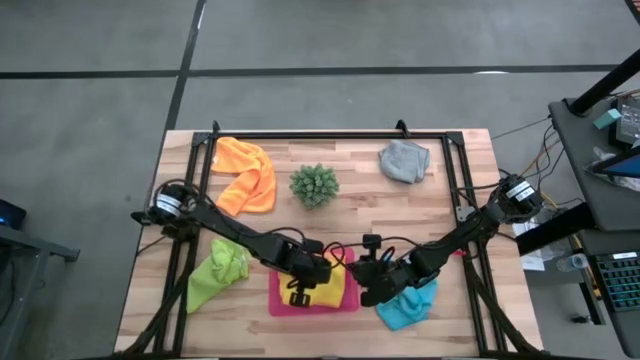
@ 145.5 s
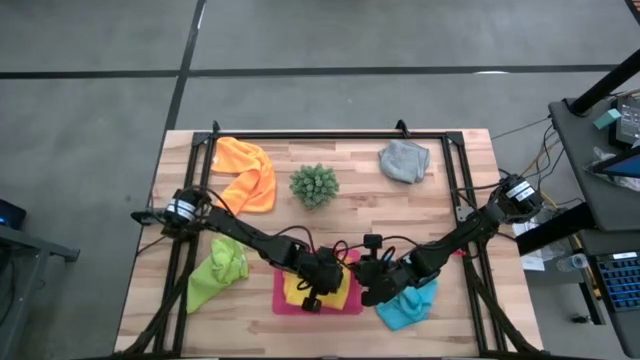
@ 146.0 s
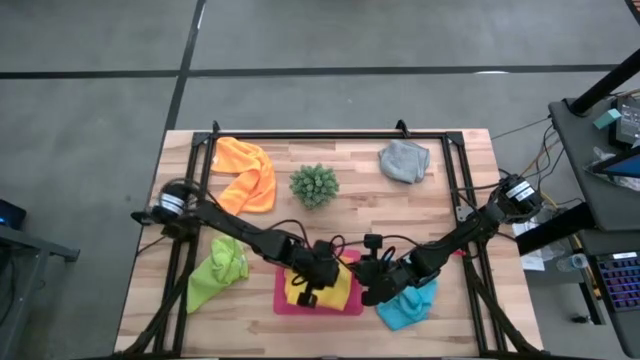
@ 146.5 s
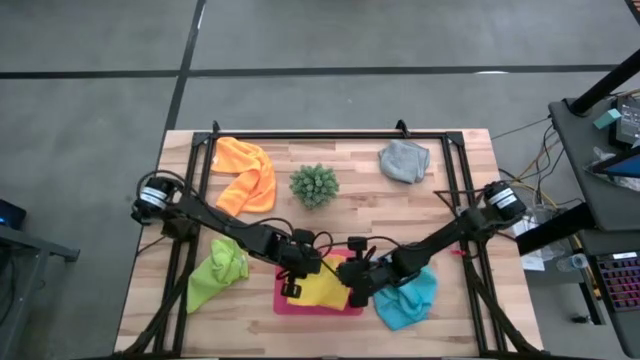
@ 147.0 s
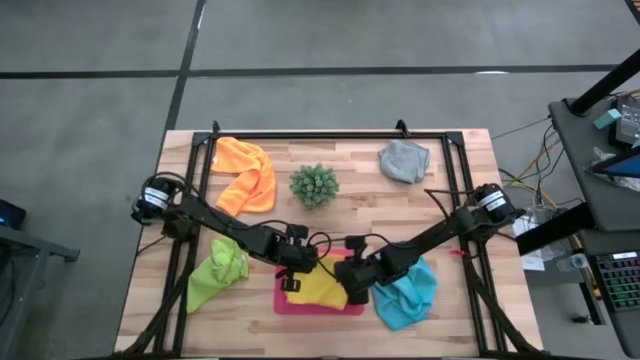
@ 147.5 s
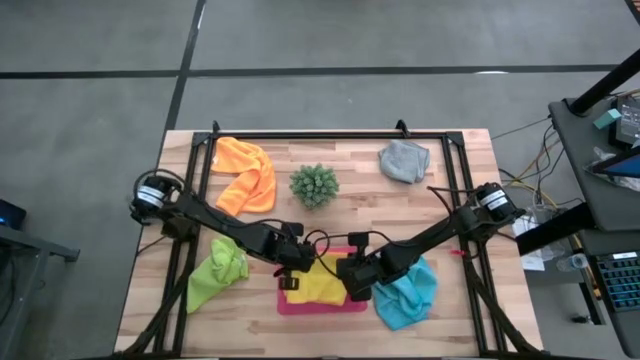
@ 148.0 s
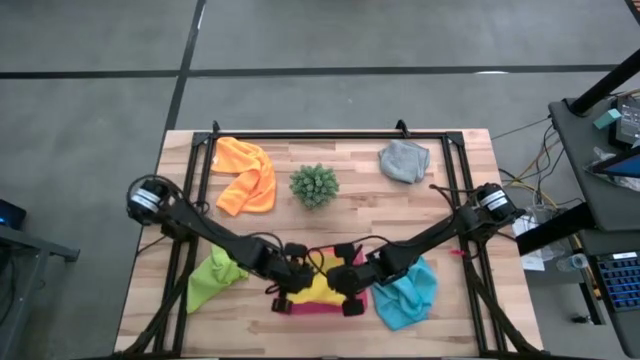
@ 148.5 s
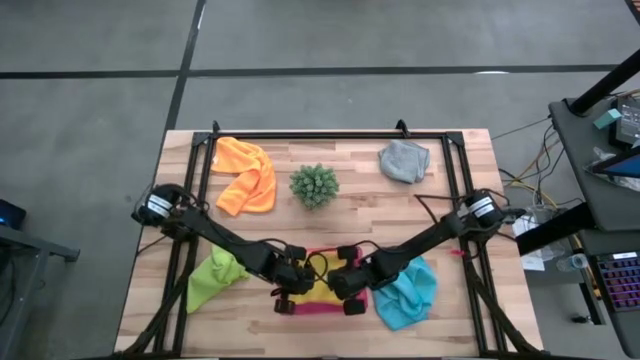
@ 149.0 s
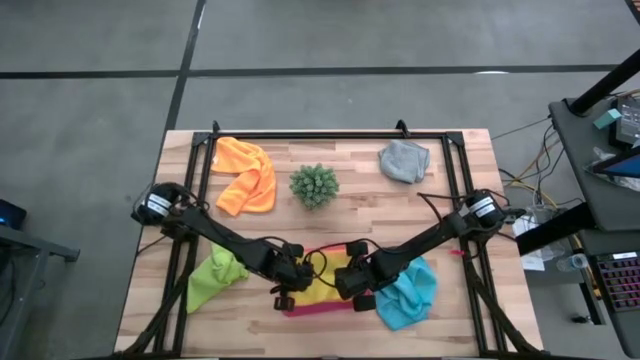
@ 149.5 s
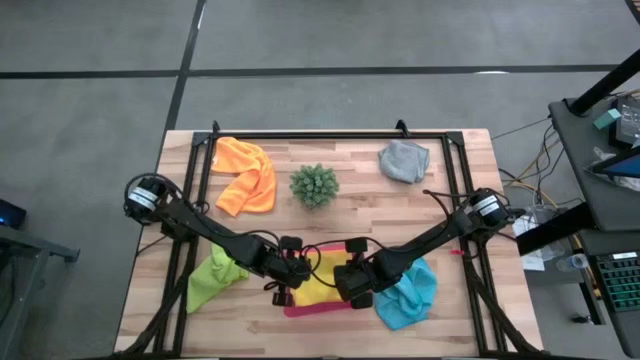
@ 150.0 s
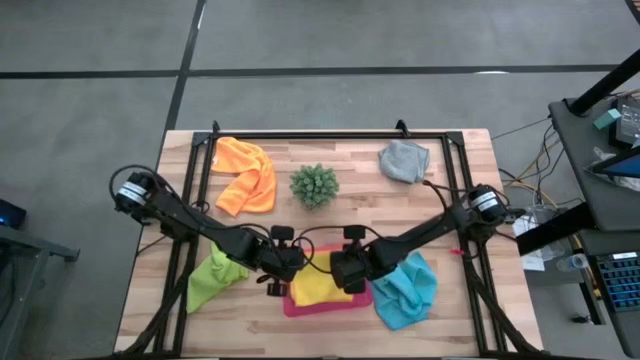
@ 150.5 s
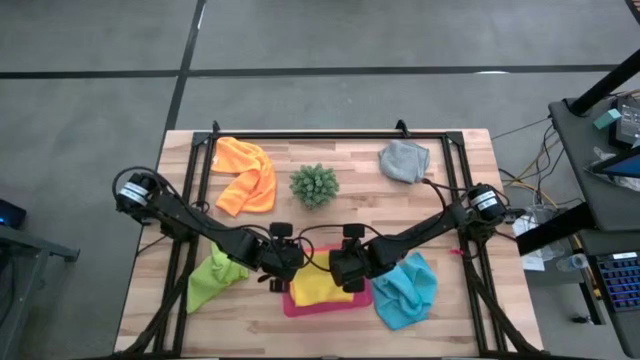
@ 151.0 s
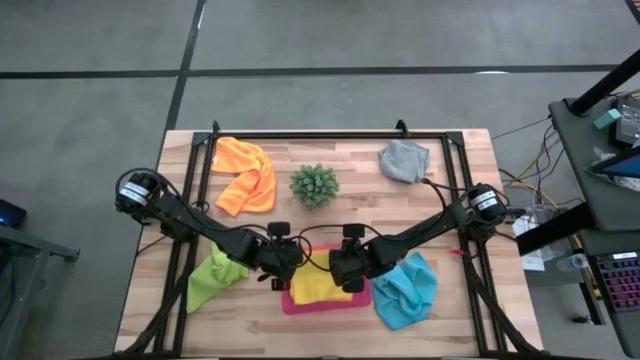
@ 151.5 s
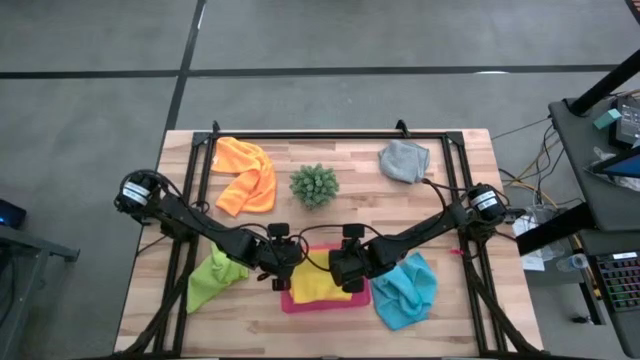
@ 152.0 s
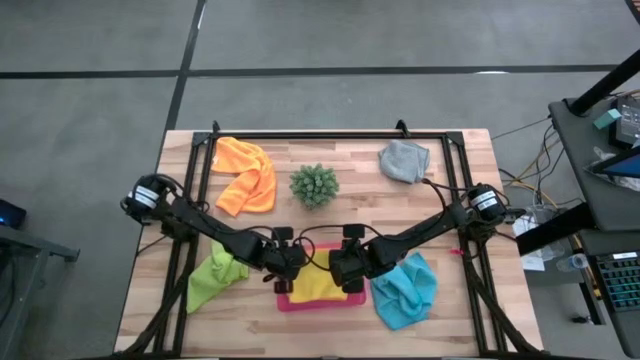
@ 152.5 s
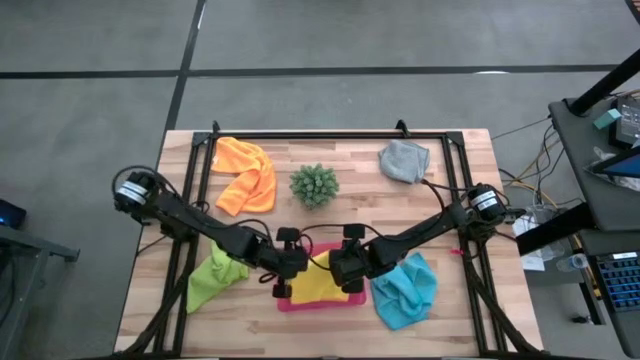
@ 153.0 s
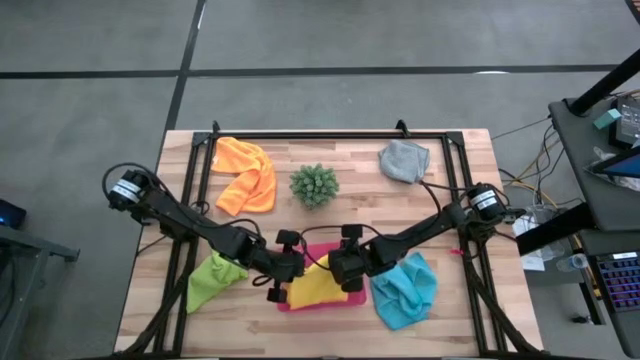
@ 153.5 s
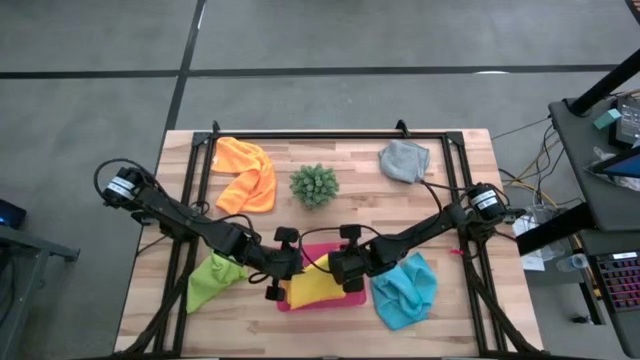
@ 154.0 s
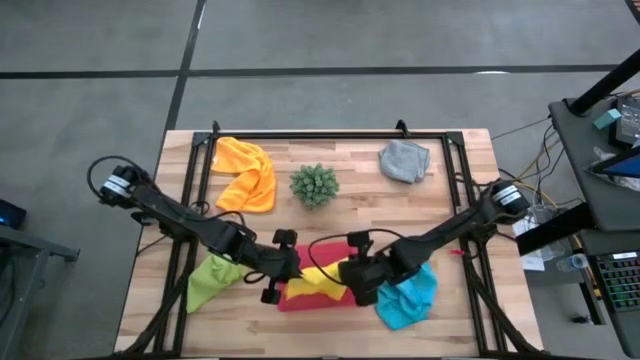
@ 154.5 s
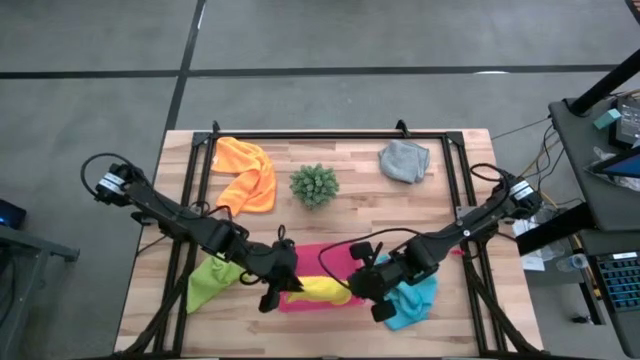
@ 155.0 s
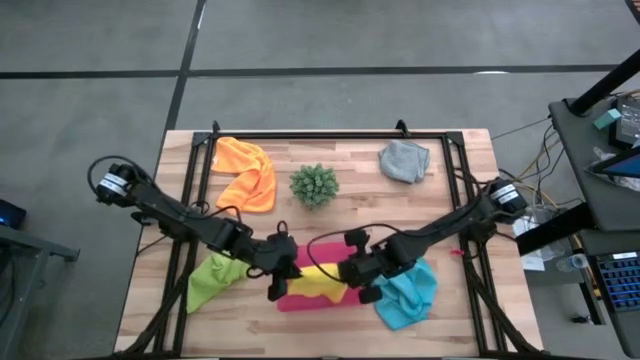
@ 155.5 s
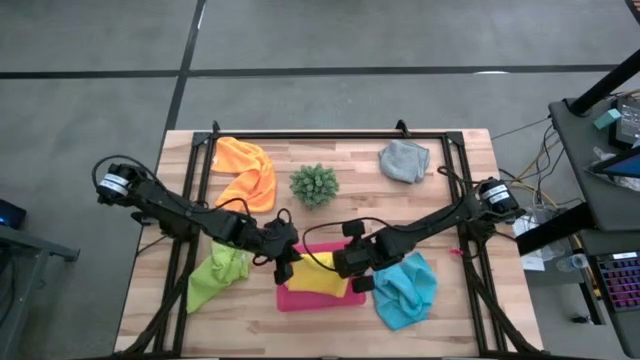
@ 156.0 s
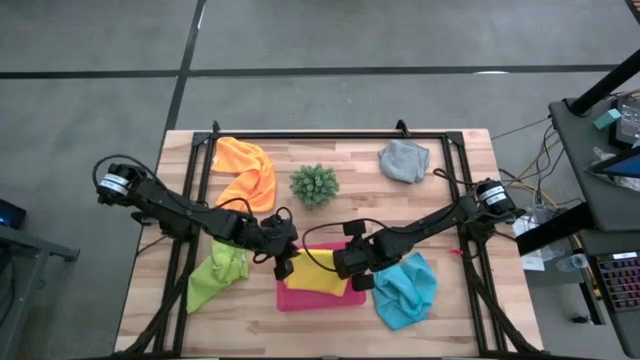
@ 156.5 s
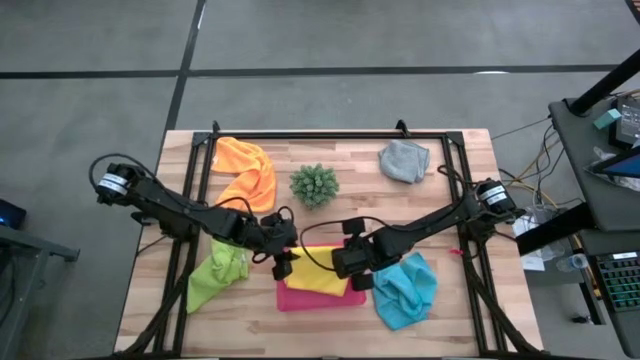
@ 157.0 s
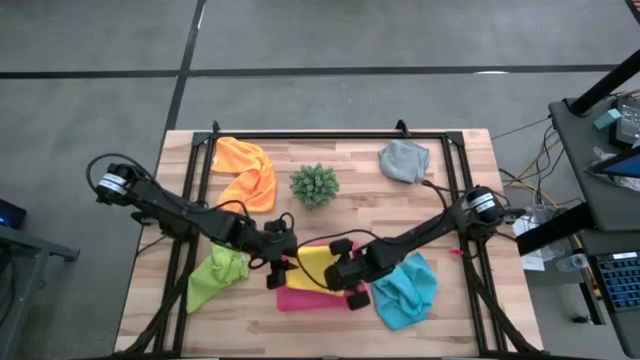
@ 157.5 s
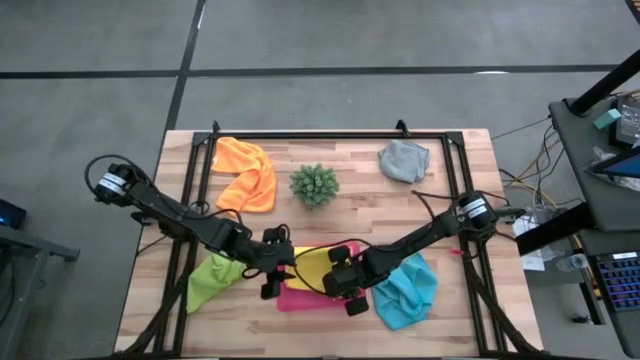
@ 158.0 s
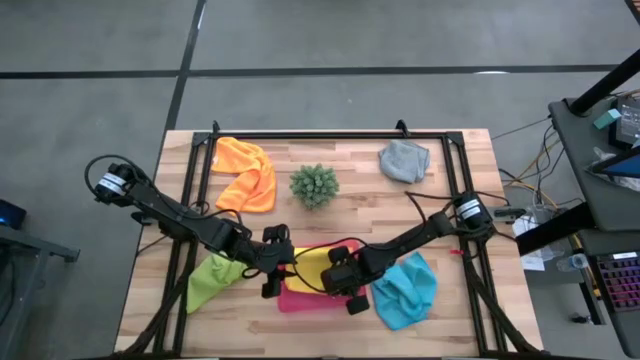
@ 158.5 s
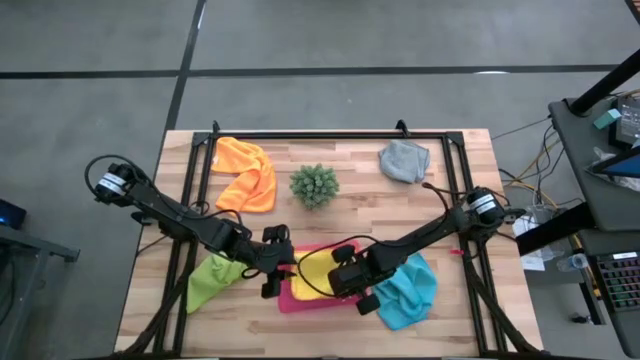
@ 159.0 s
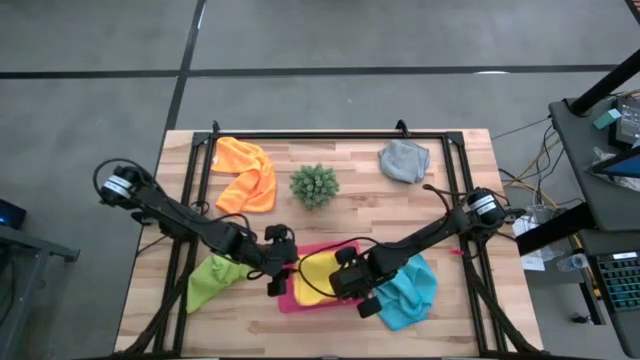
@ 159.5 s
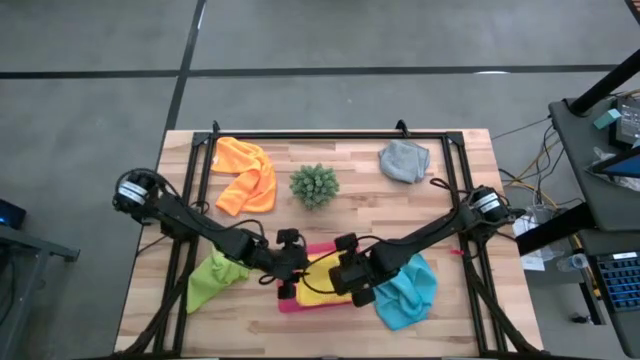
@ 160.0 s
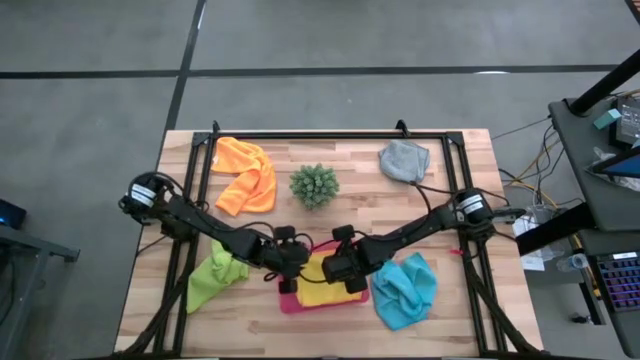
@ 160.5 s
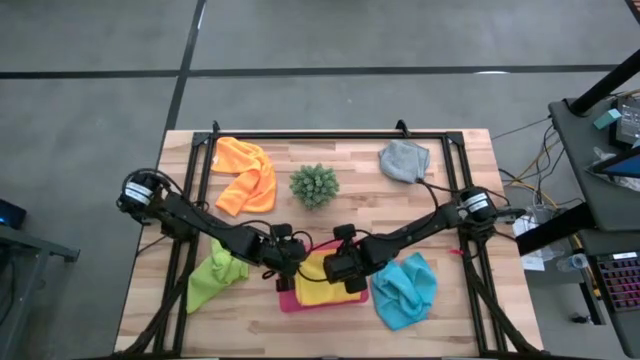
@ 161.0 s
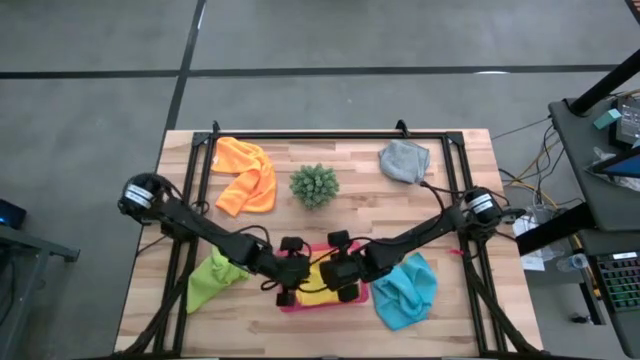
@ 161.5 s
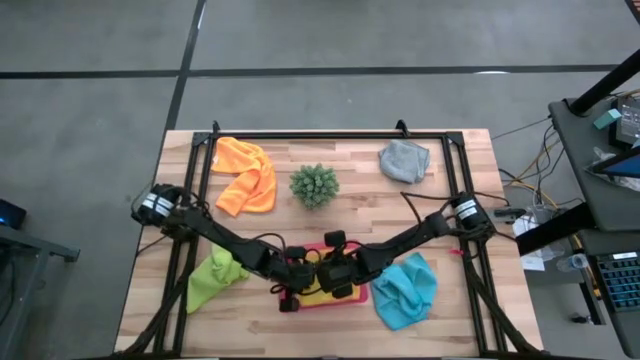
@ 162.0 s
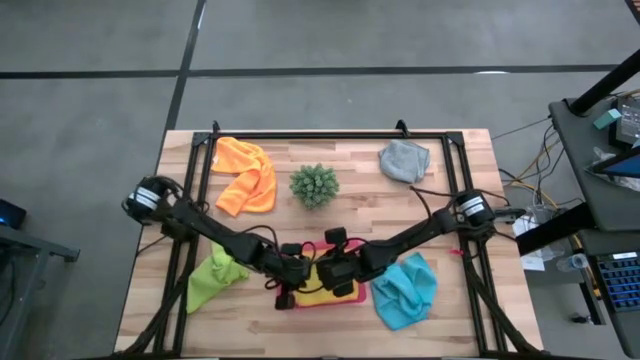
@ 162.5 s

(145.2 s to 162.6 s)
Task: Fold microfiber towels
Put the yellow microfiber cloth into the pink bin

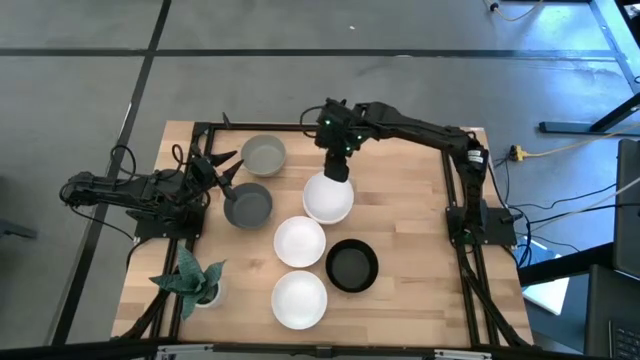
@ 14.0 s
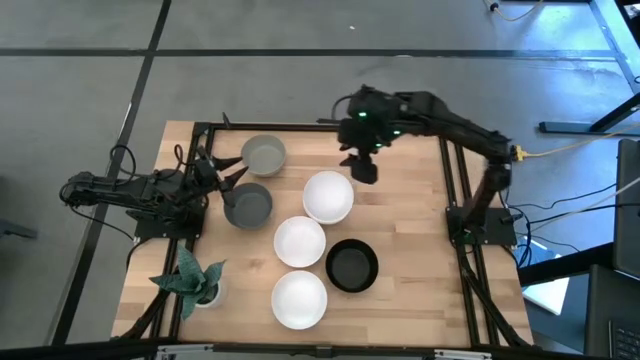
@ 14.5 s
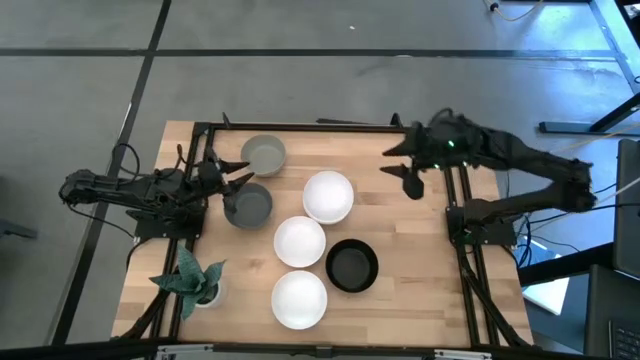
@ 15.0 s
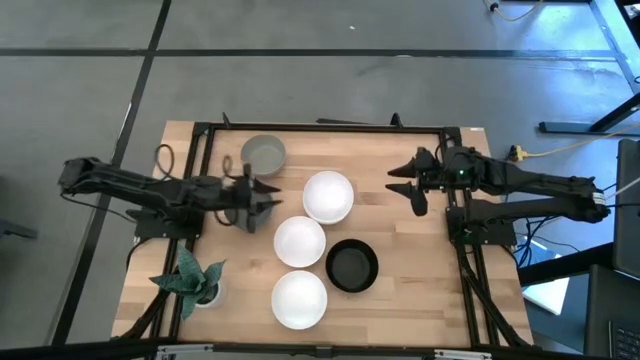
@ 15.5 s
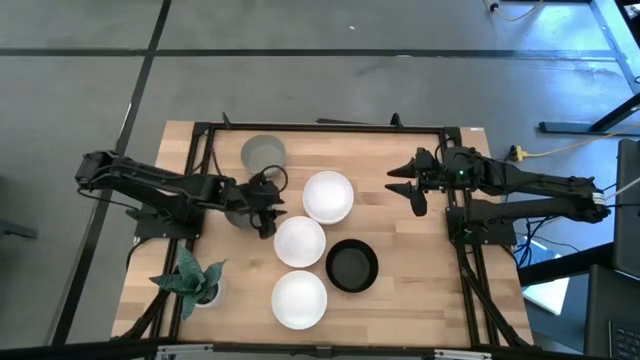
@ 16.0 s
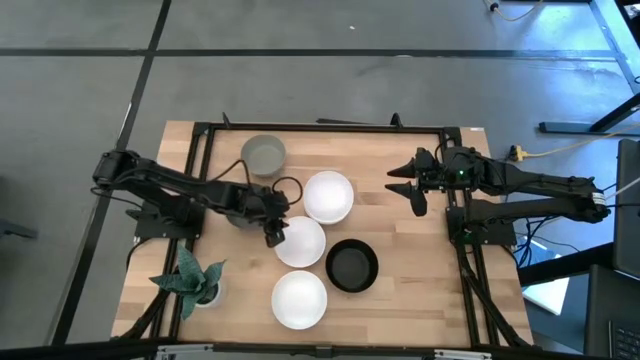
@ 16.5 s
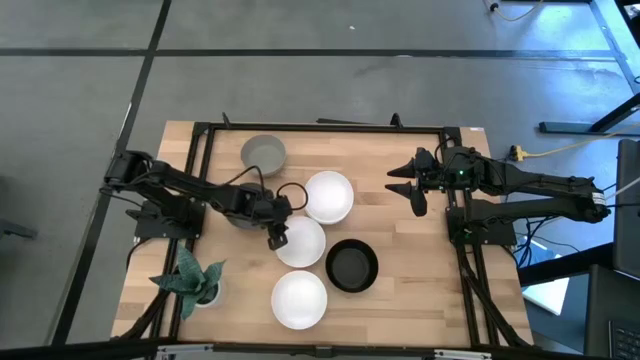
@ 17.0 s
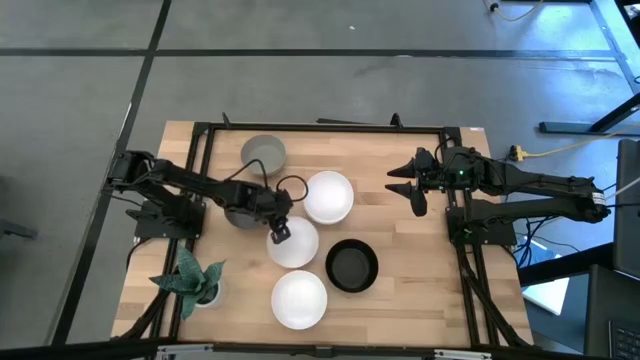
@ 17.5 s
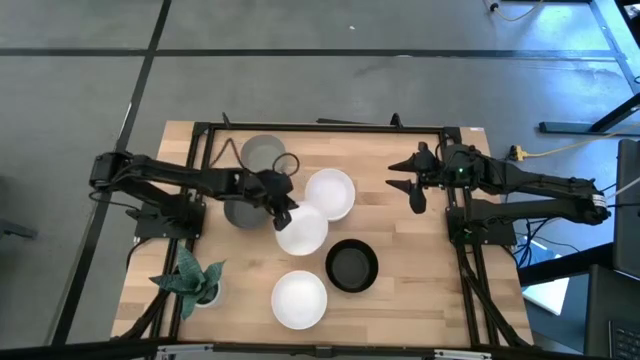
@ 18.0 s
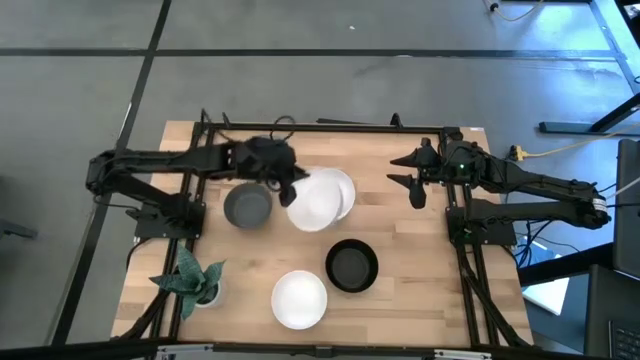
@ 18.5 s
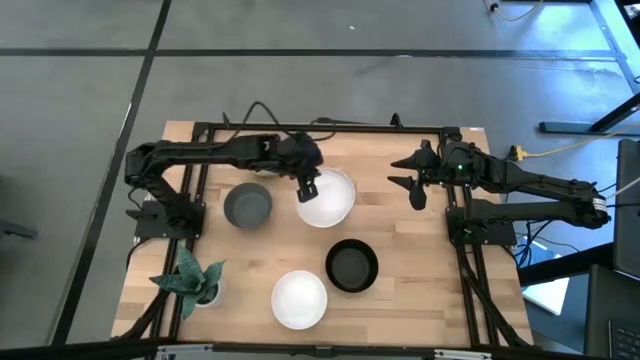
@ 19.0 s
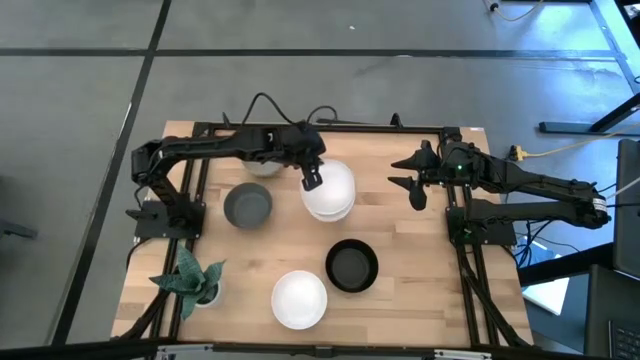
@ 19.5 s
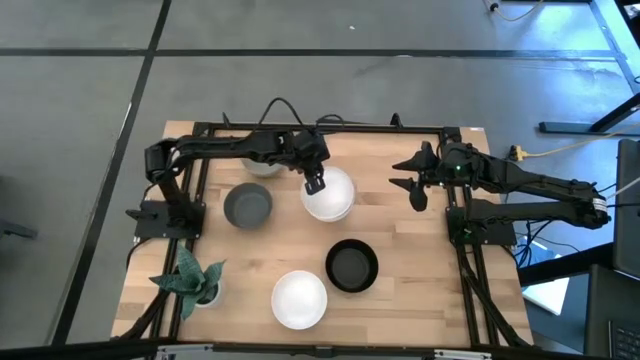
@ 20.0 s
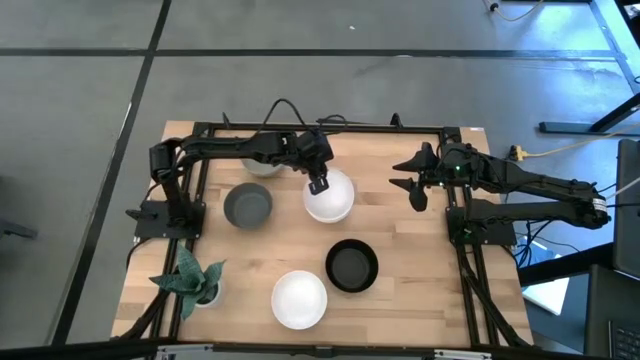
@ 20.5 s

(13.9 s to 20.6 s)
Task: Nest bowls inside each other
Stack the white bowl on top of the white bowl
